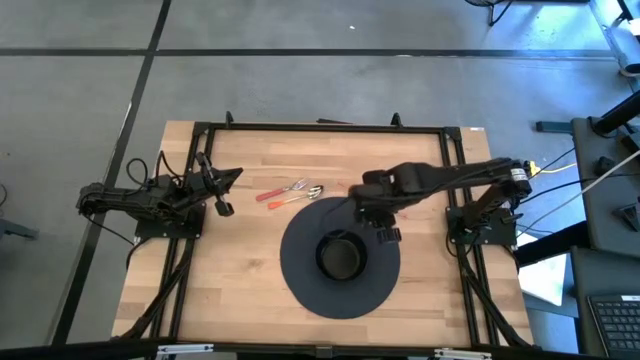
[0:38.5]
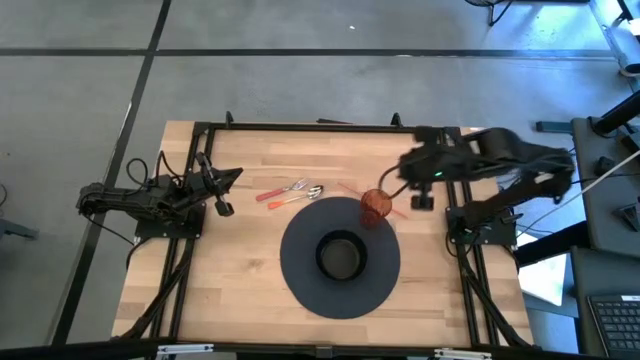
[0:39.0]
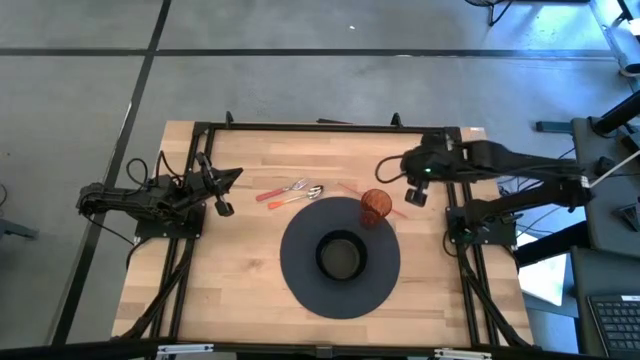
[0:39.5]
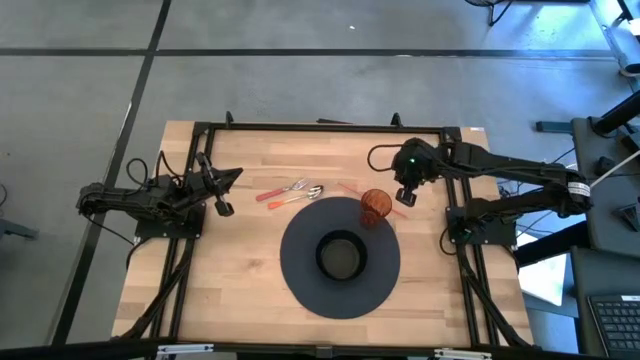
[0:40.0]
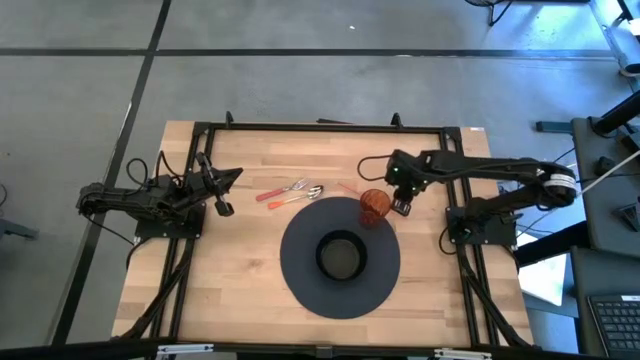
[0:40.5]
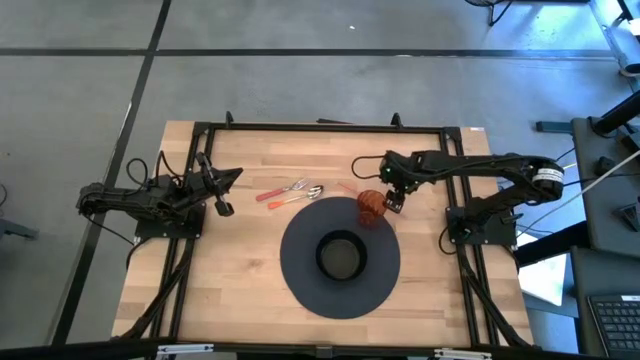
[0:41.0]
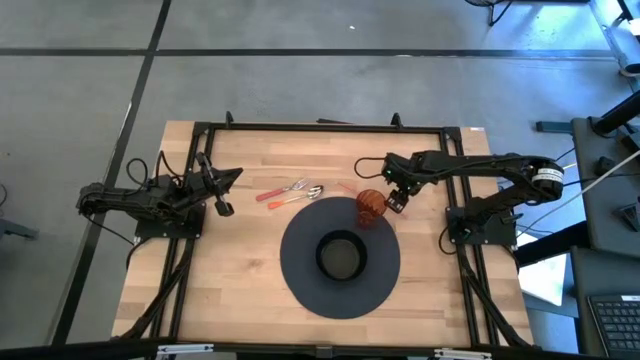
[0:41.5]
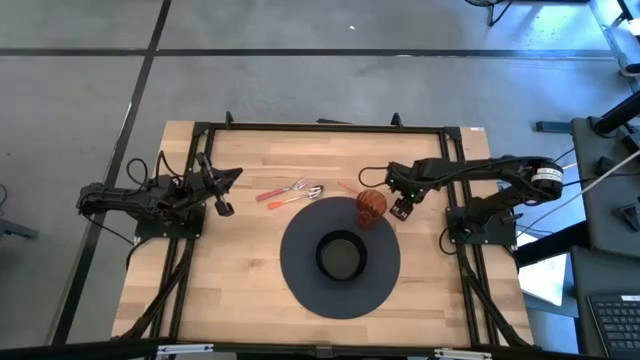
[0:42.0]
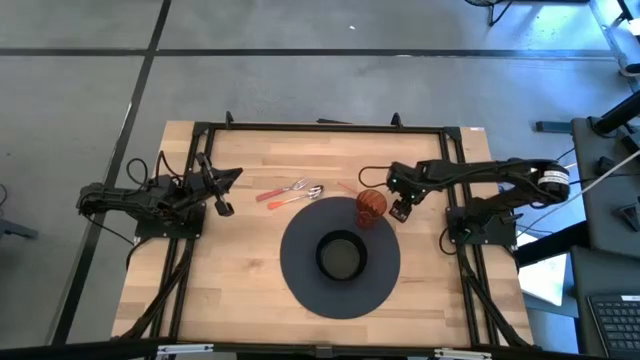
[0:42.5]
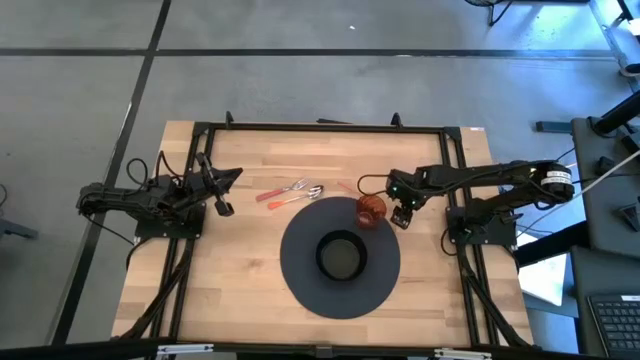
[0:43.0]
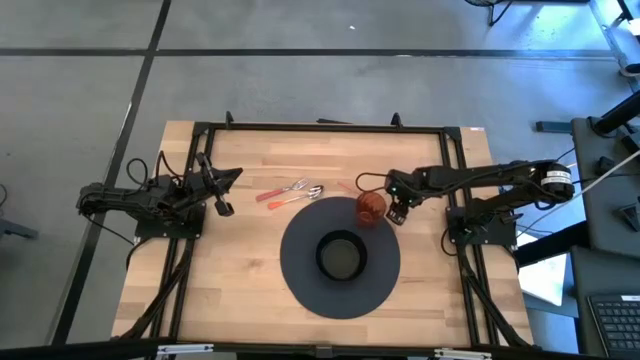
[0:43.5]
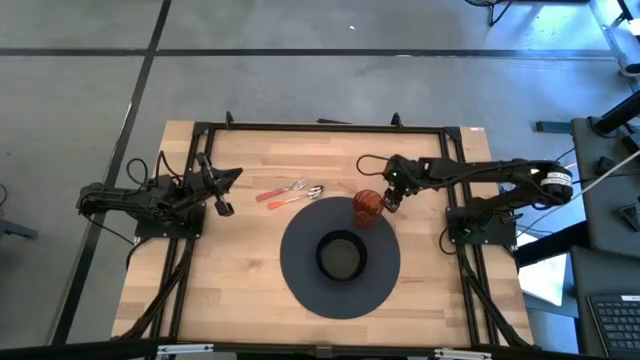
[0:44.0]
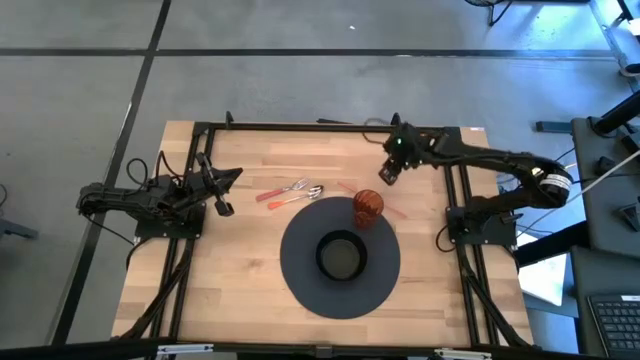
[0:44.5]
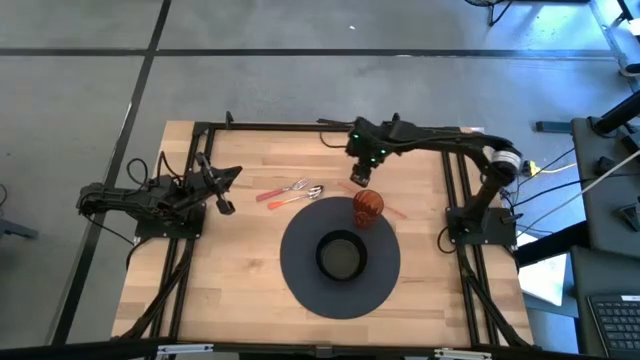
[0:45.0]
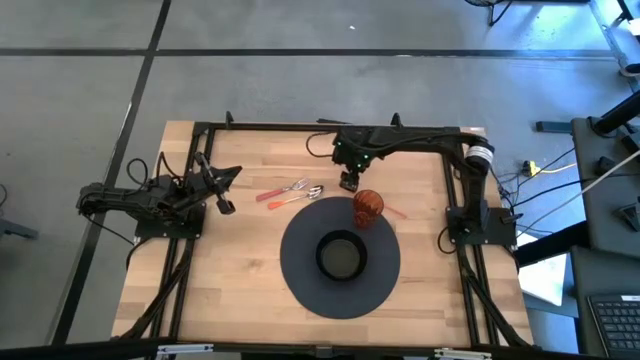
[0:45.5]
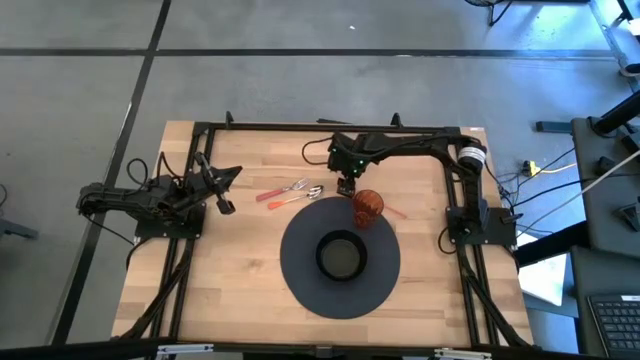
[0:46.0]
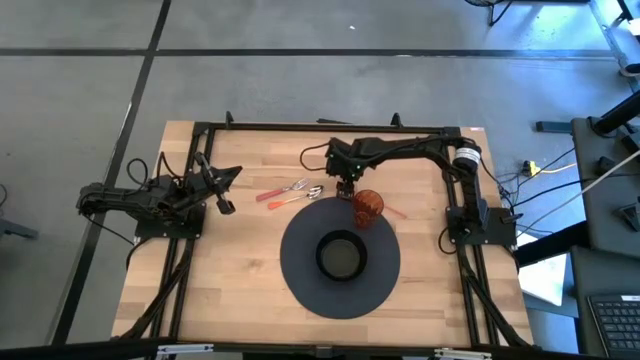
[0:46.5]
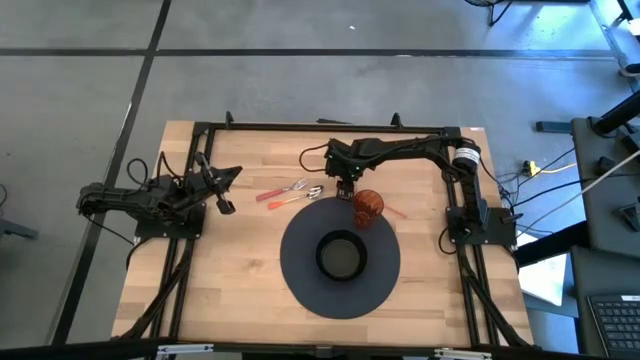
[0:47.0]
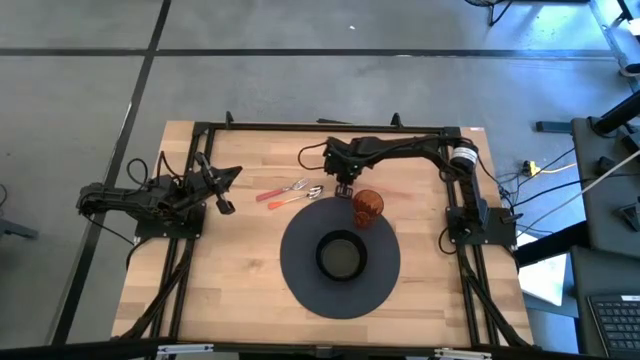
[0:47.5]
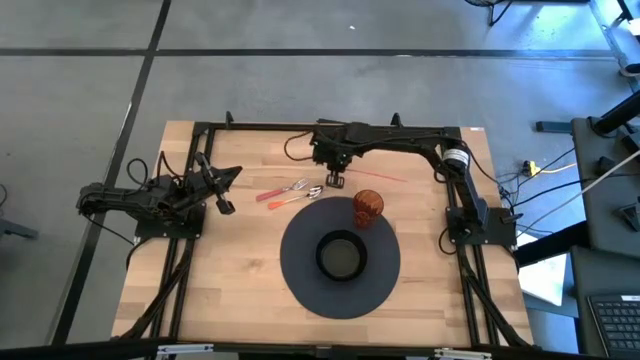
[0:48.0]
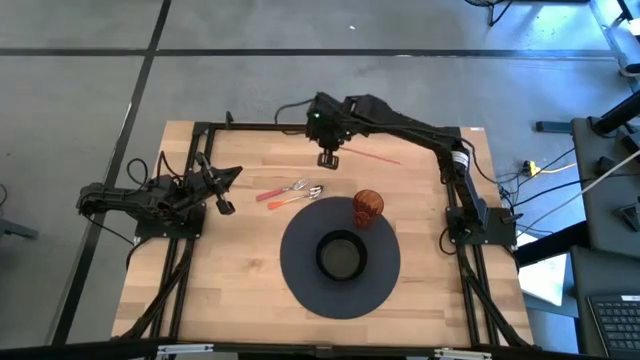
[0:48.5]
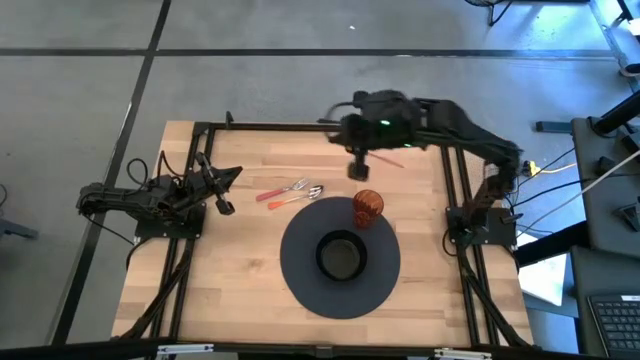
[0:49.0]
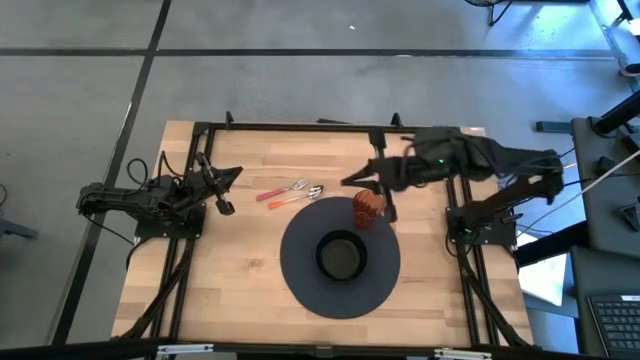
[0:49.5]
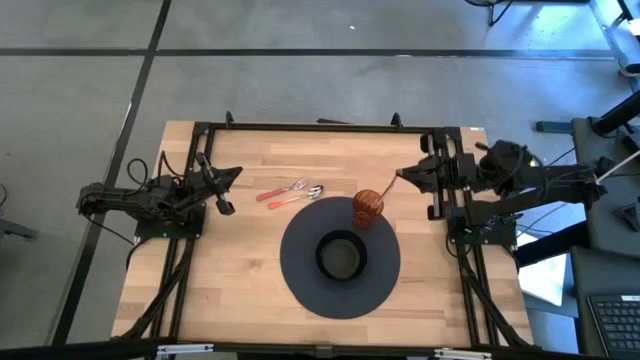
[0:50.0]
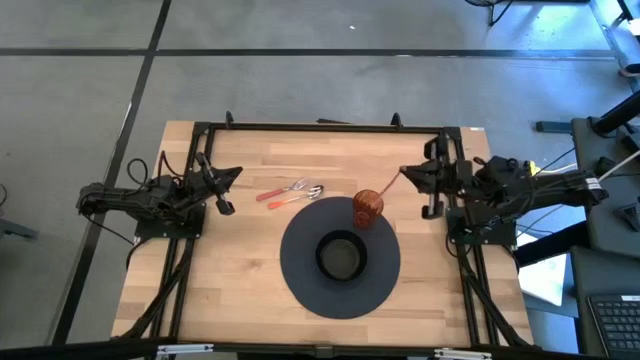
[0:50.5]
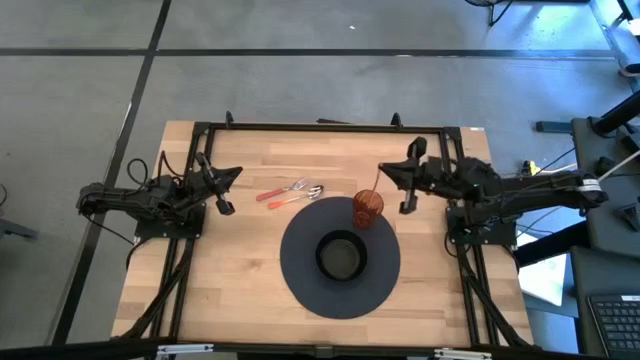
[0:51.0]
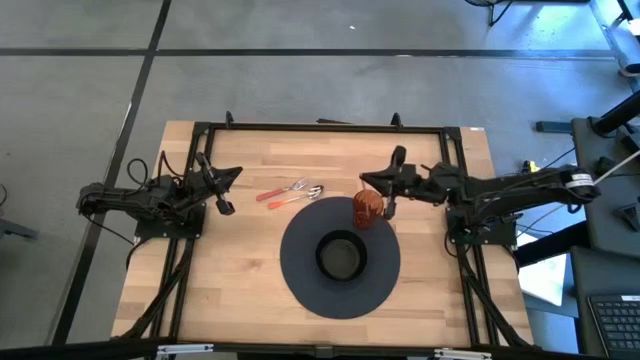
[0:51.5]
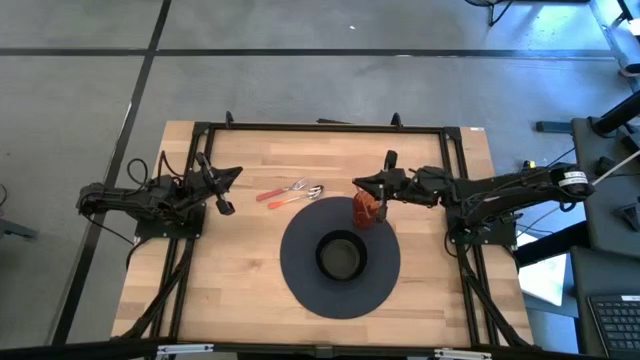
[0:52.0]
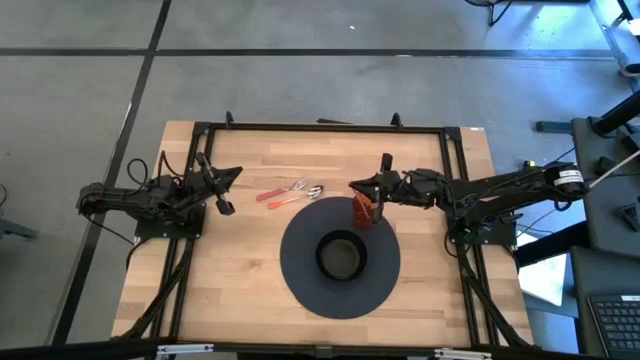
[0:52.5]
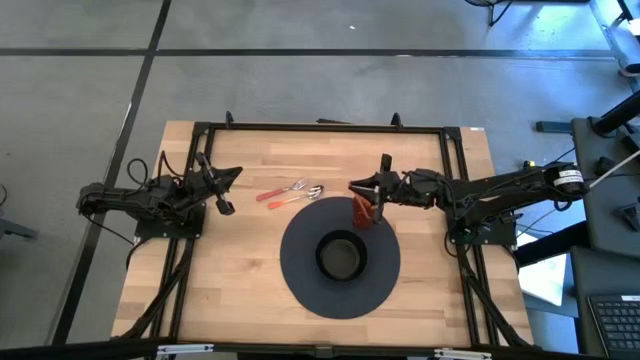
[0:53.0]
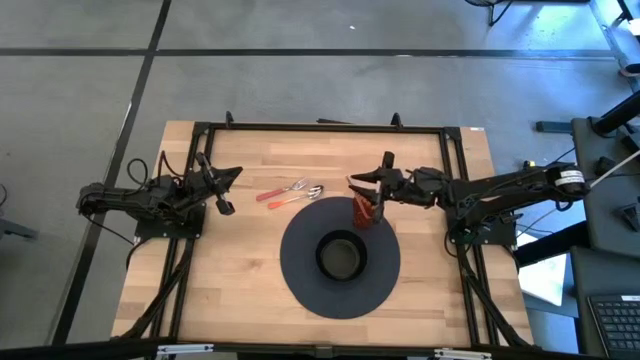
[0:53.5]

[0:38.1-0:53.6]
Task: Pick & Place Utensil
Put the orange drinking straw into the orange cup

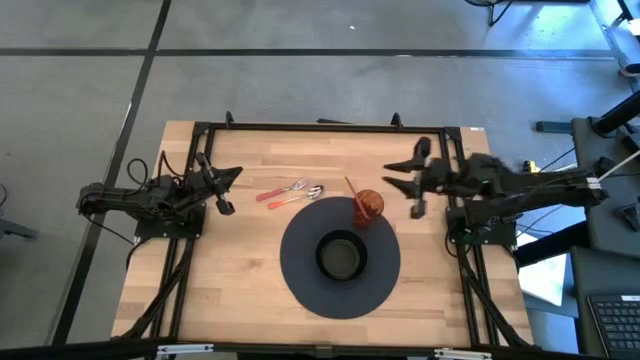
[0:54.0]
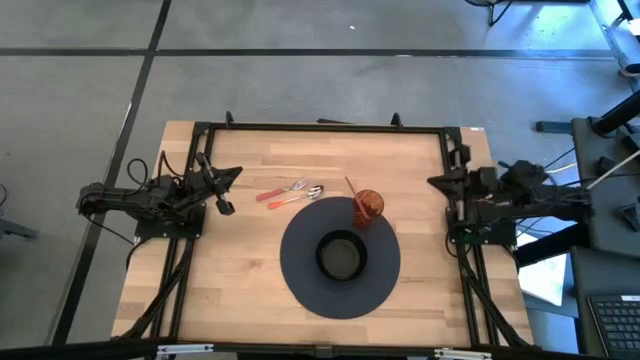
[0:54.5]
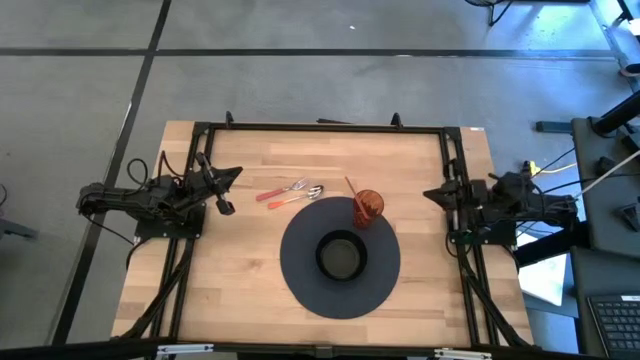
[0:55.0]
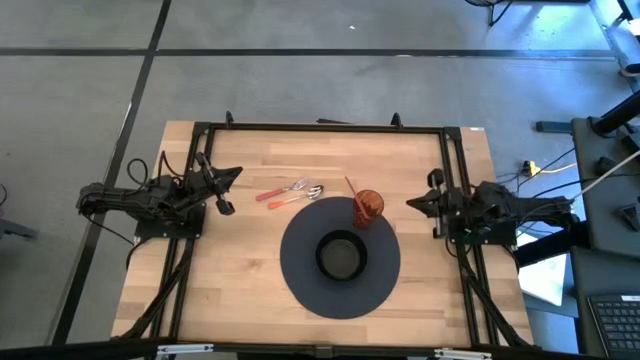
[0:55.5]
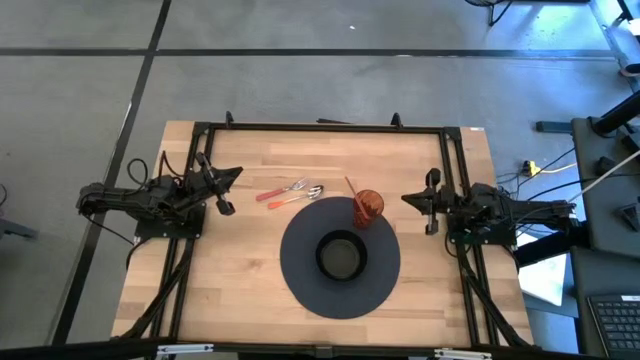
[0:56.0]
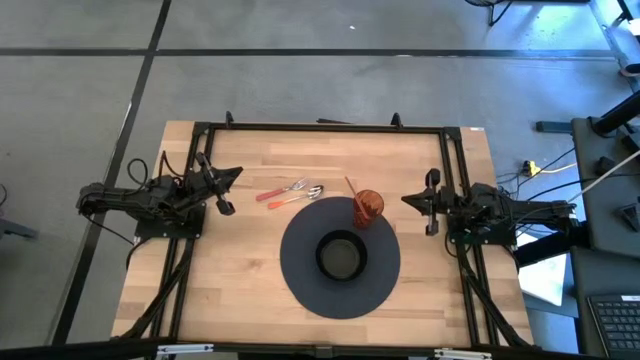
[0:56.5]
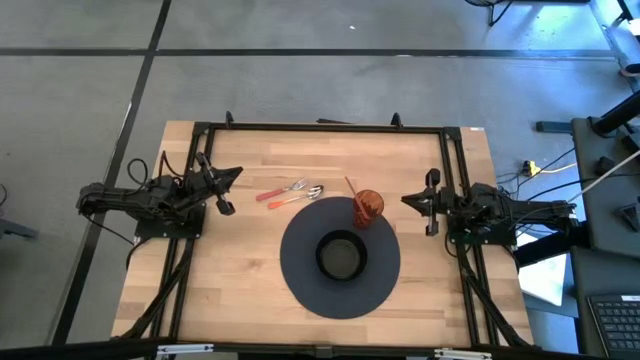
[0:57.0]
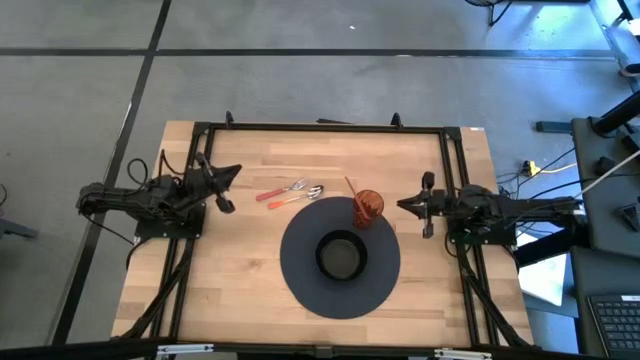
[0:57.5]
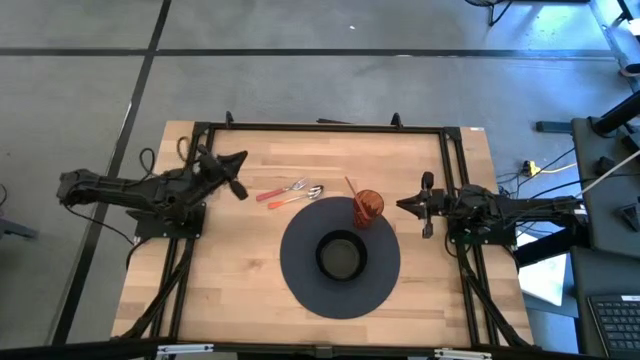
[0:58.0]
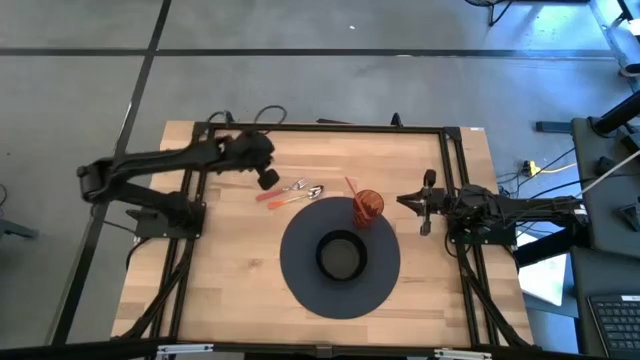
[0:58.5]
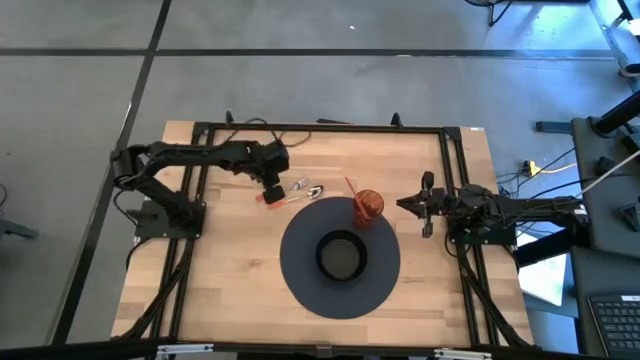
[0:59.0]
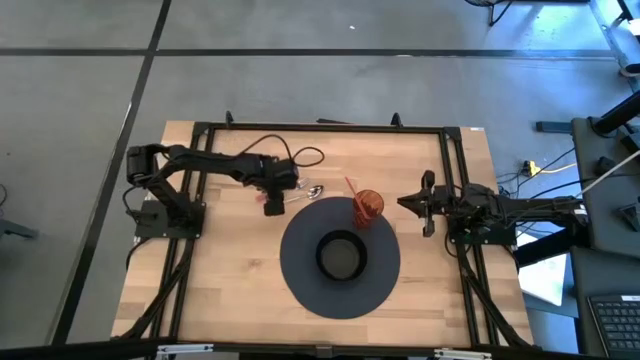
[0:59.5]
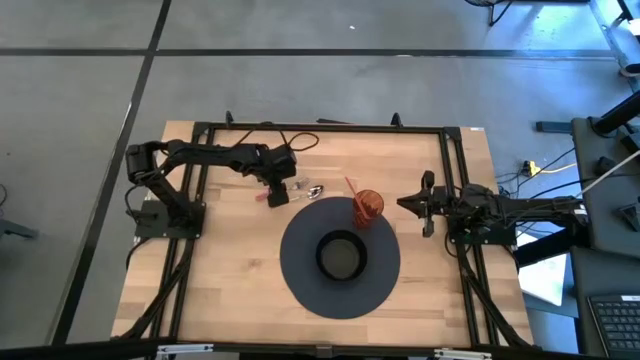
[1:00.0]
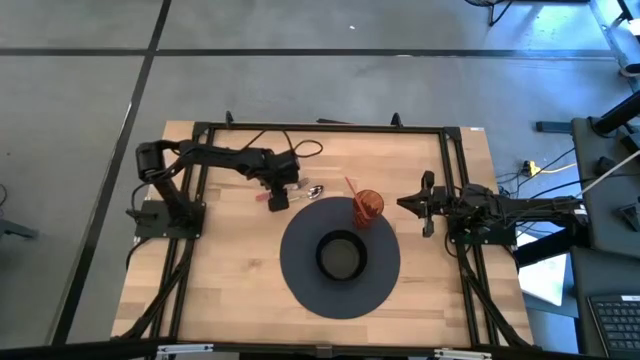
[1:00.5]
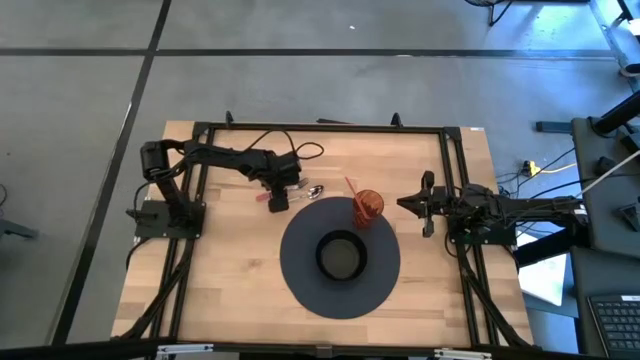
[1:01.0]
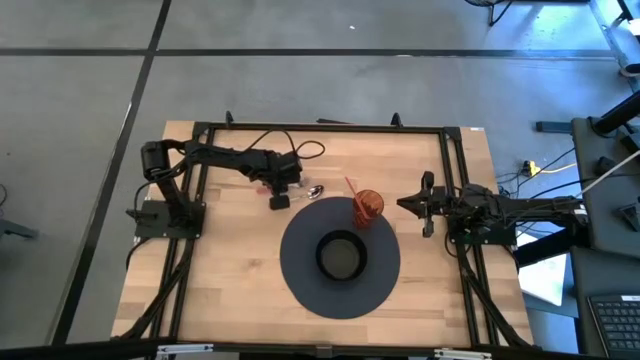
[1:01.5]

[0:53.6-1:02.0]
Put the pink fork into the black bowl
